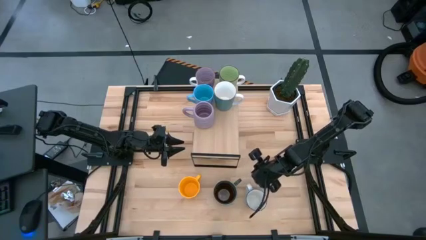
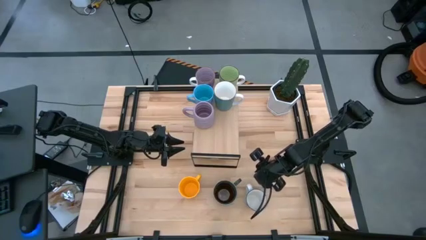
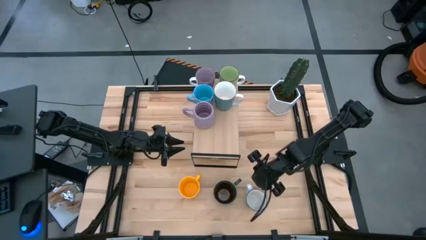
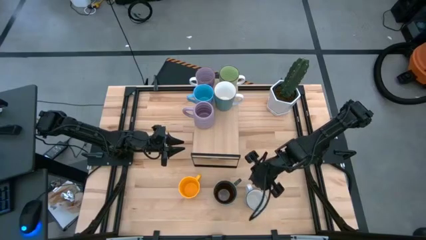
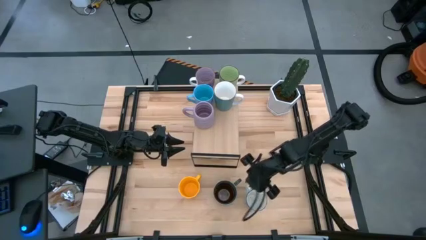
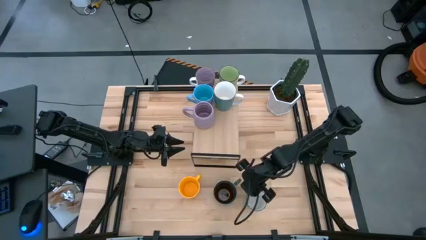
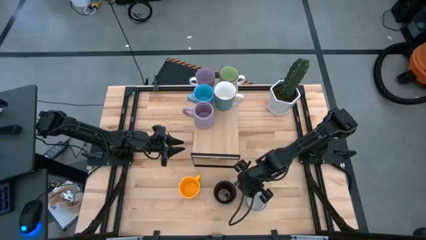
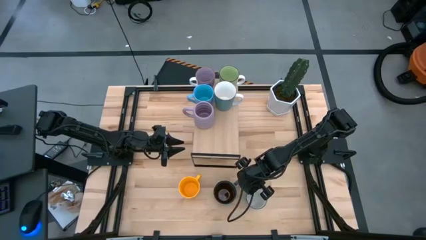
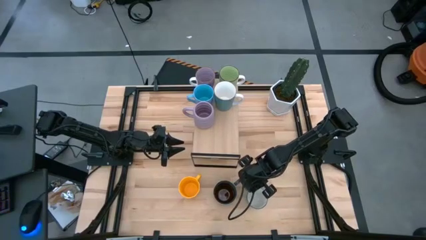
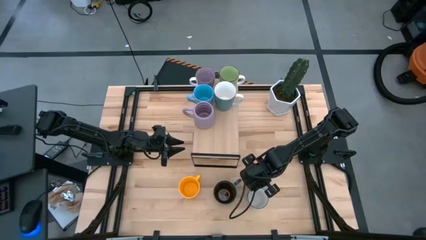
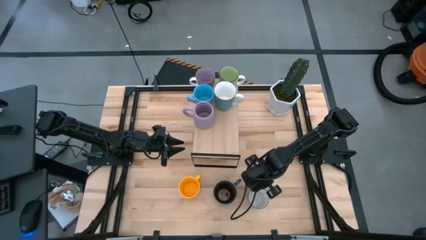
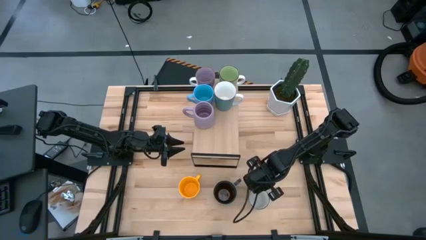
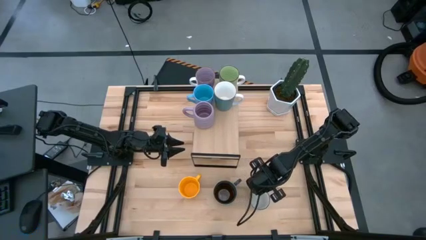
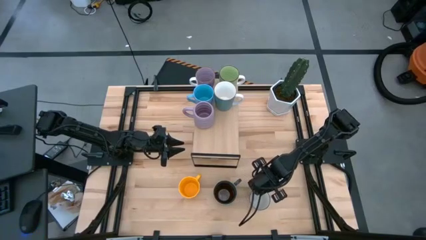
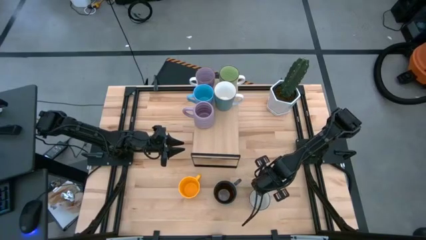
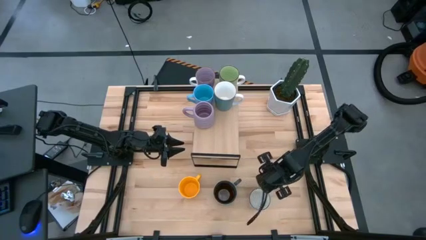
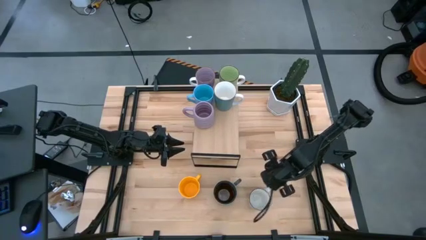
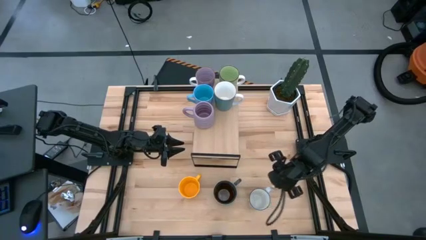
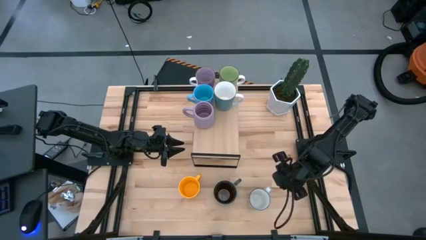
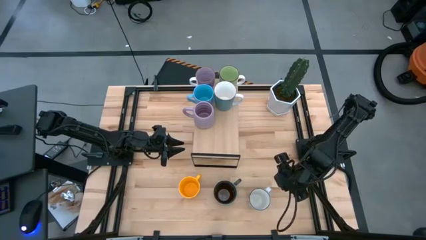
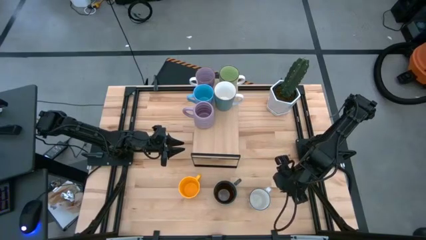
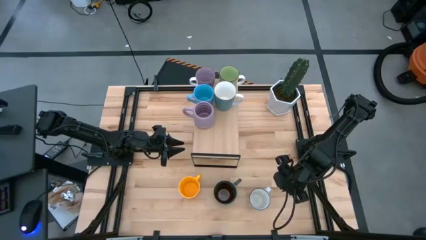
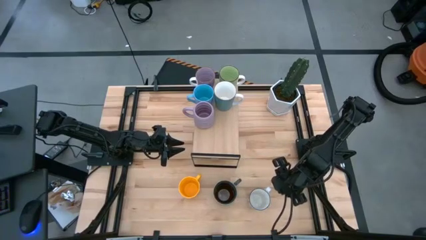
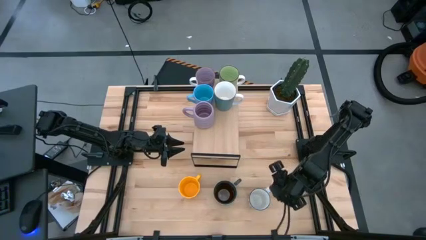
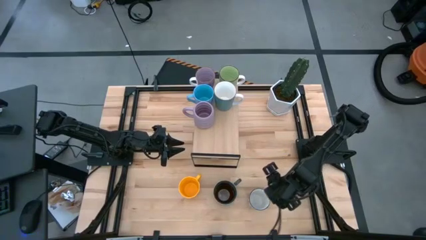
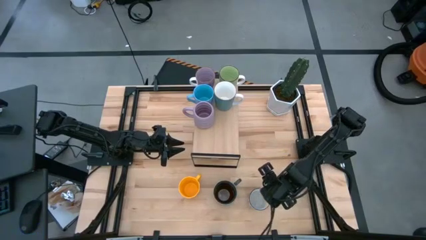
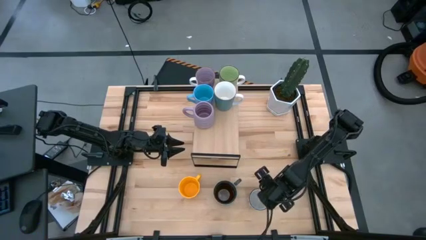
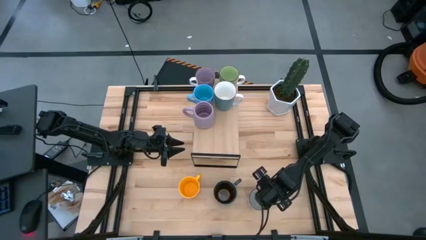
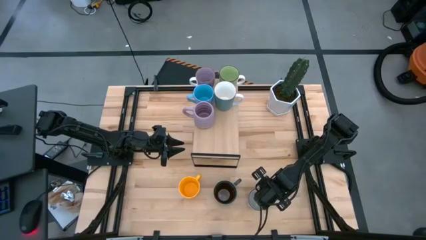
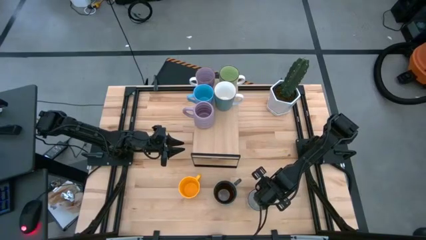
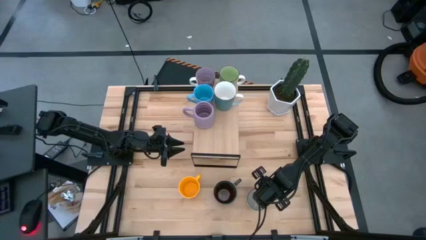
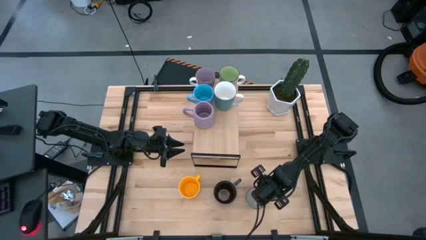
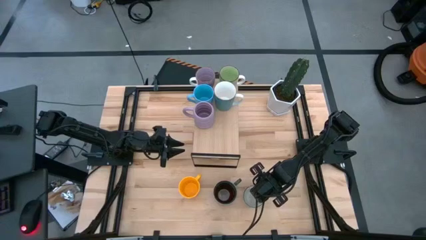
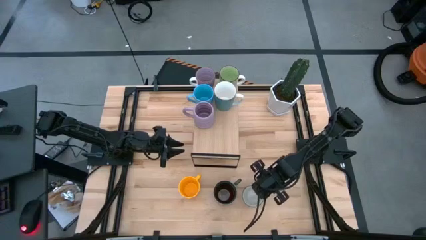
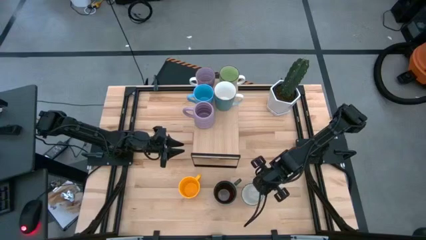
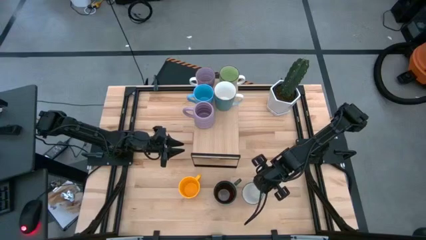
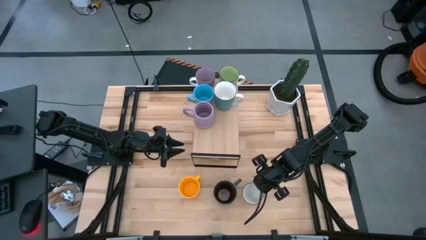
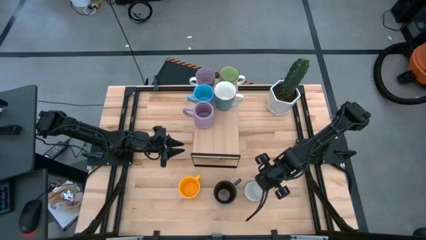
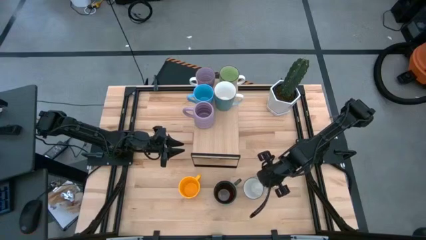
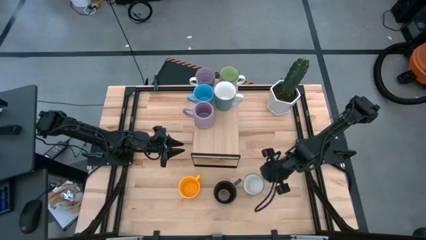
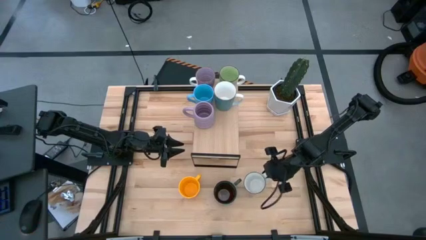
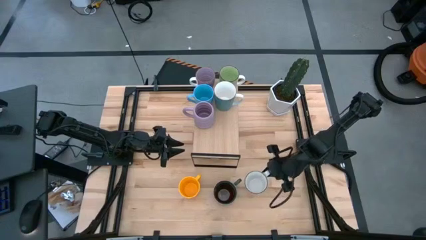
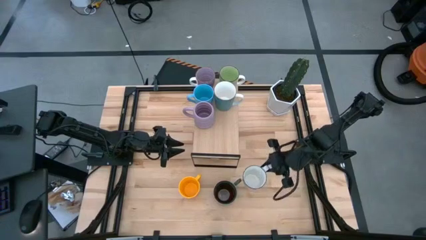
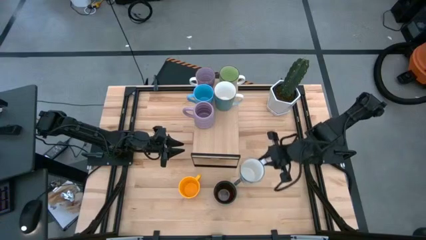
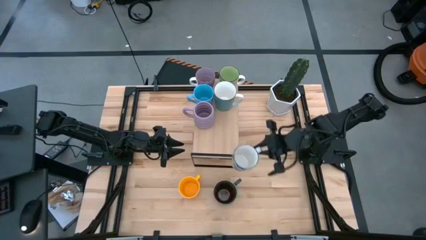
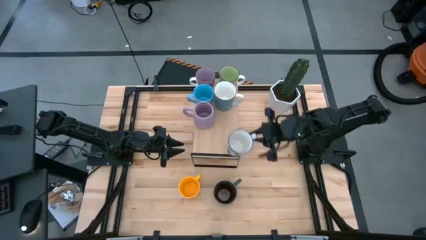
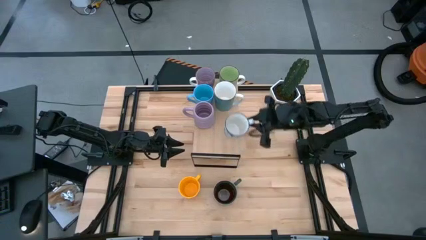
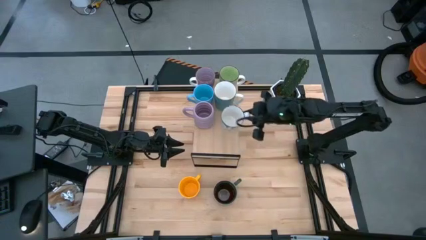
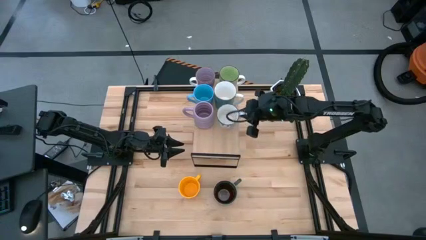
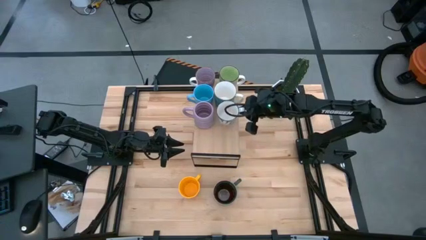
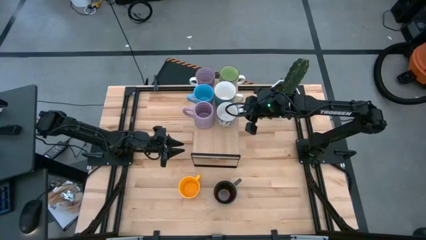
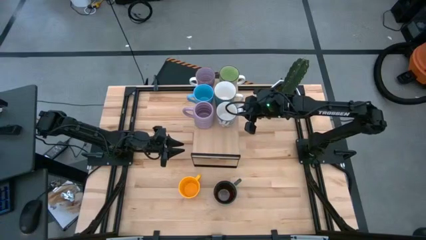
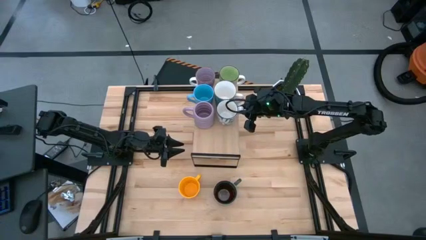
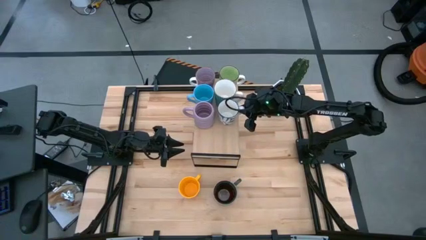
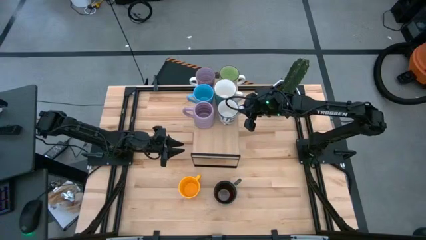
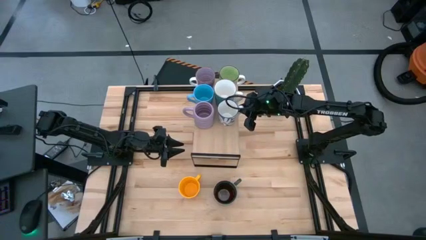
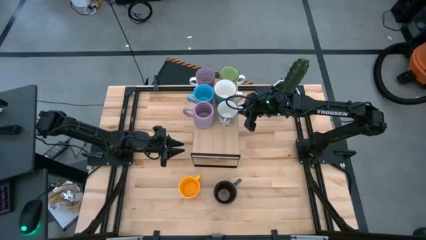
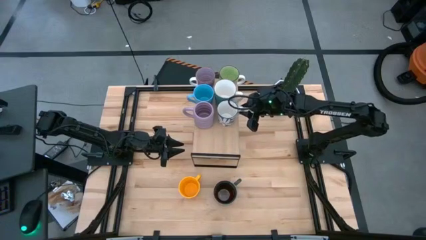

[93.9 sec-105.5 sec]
Task: Place coffee mugs
Put the light blue mug on the shelf

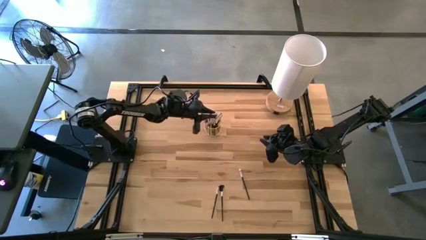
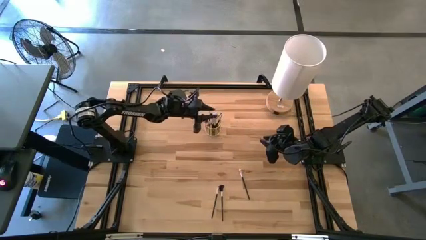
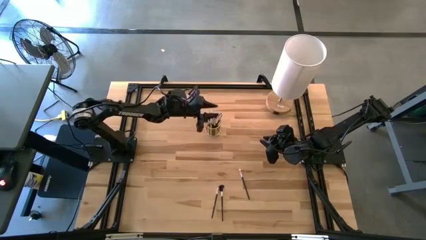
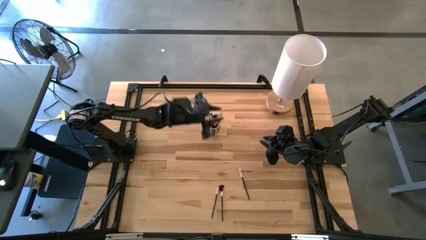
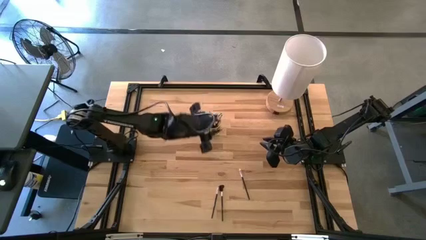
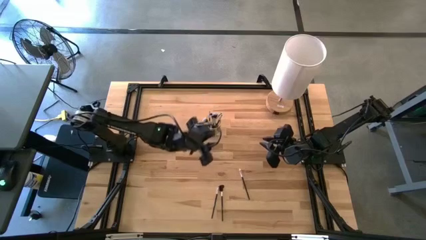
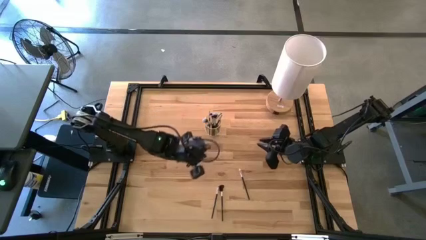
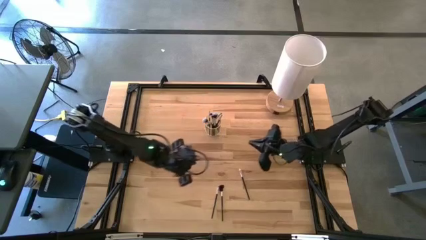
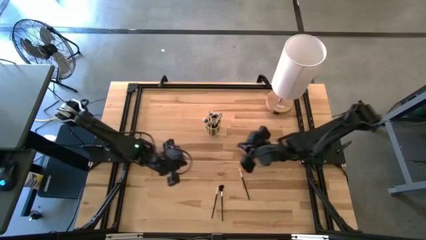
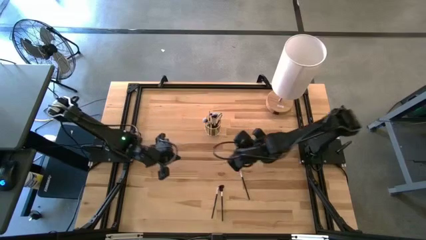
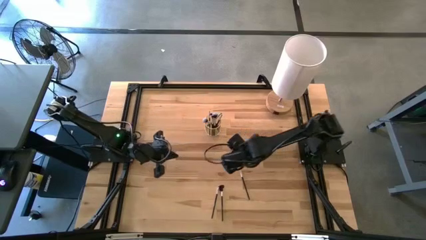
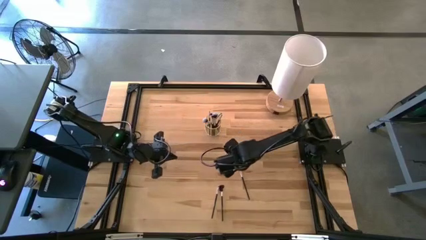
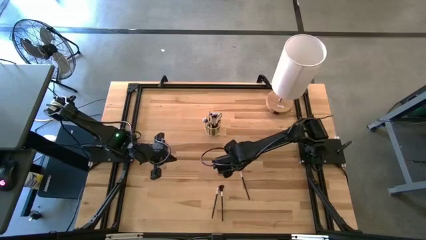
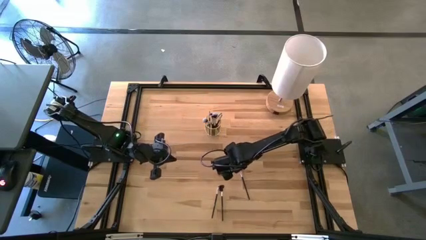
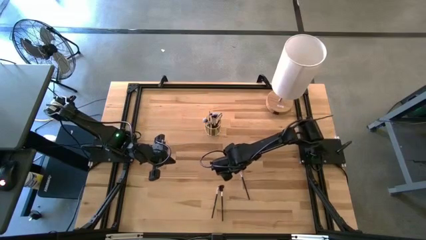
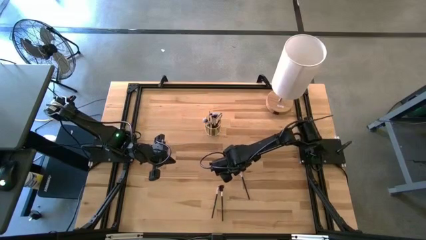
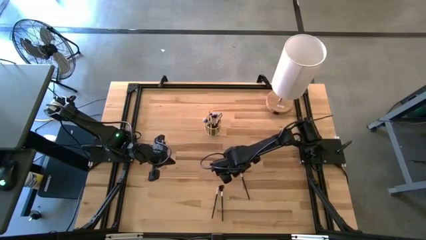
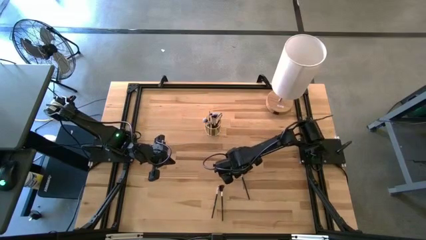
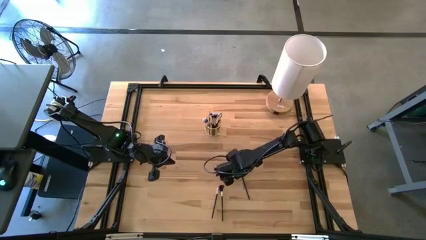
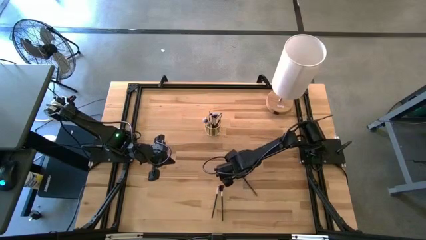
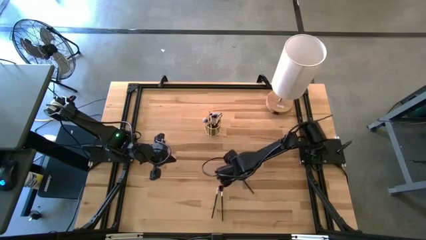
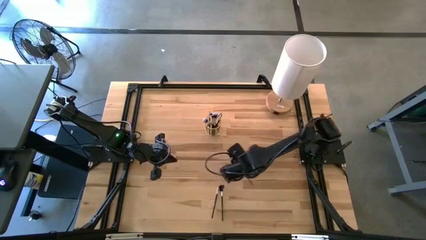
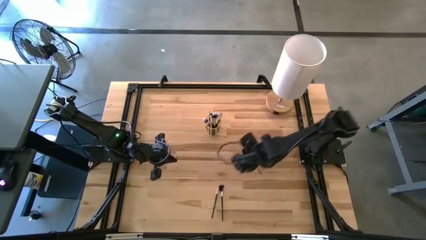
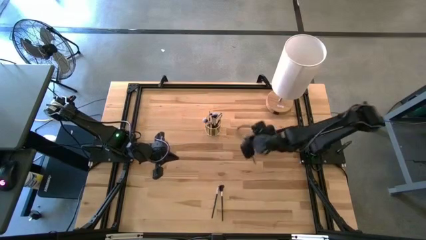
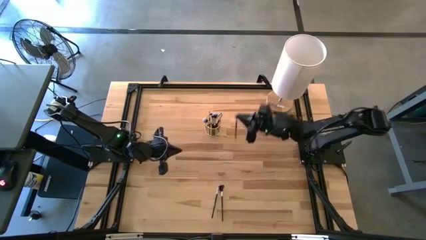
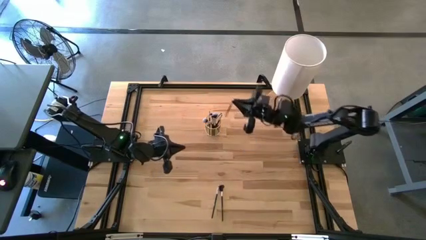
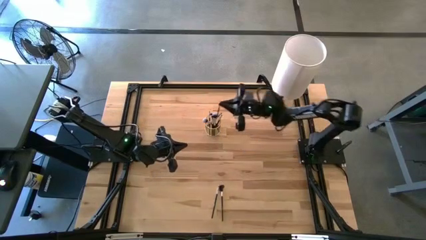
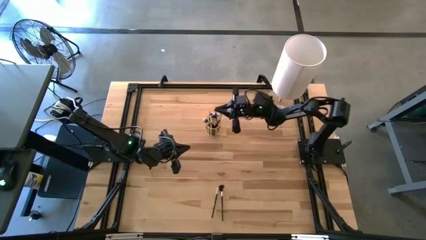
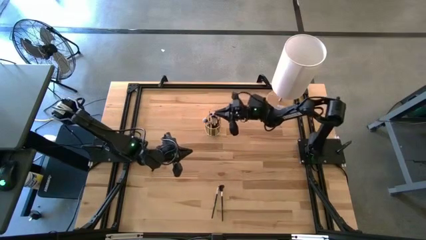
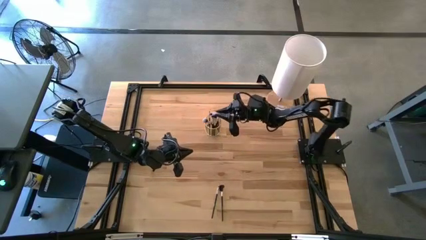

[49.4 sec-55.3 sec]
Task: Put items in baskets/containers
Put the black eyeshadow brush into the gold container
